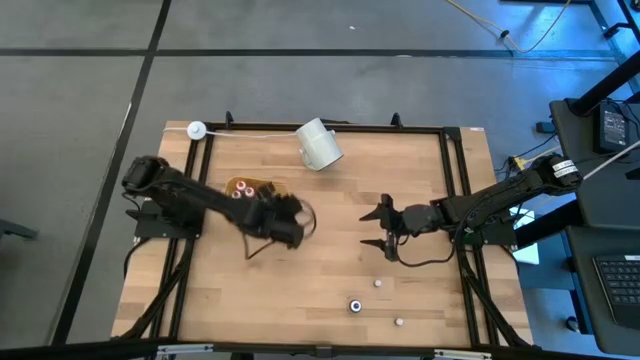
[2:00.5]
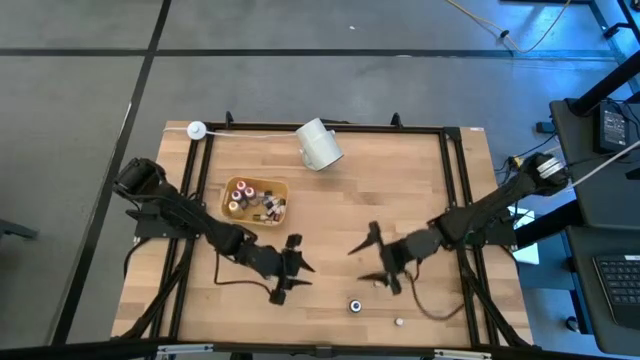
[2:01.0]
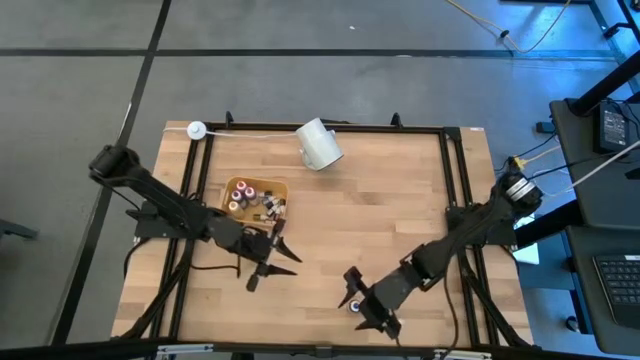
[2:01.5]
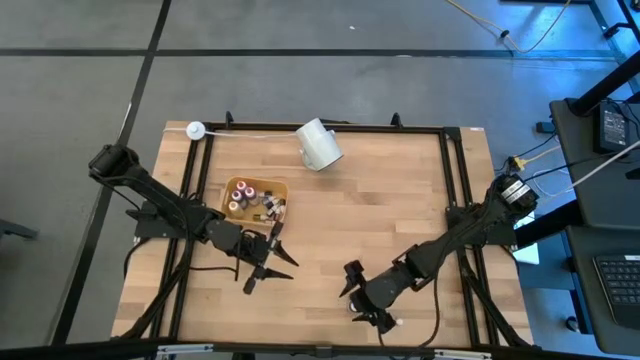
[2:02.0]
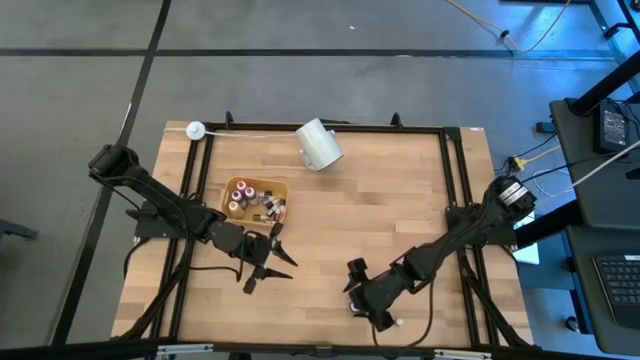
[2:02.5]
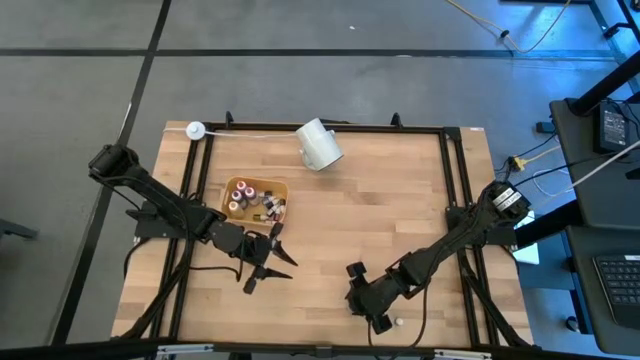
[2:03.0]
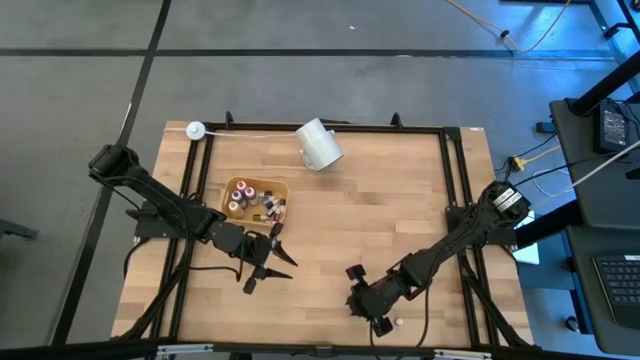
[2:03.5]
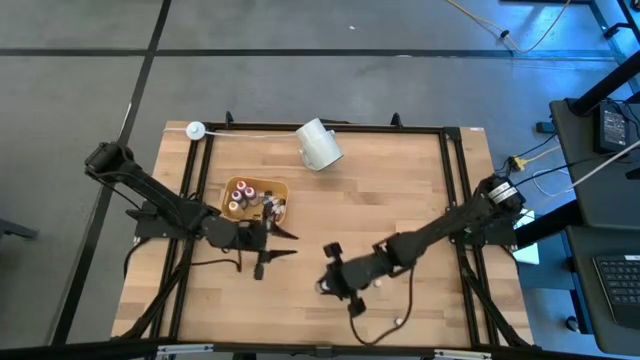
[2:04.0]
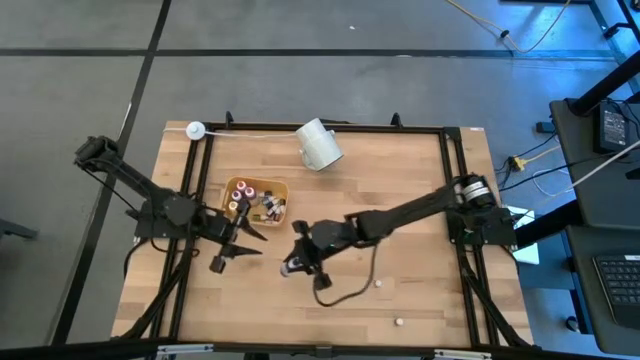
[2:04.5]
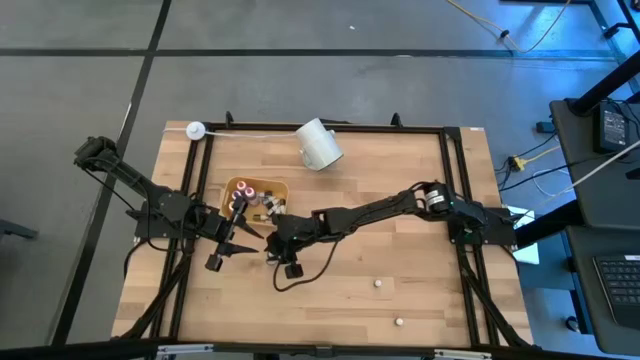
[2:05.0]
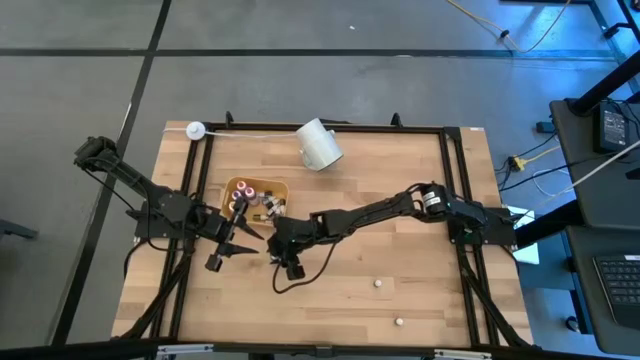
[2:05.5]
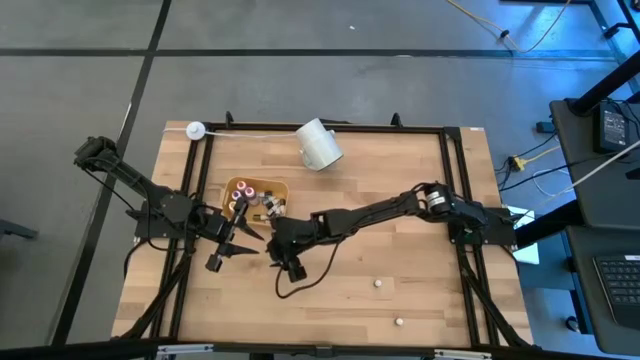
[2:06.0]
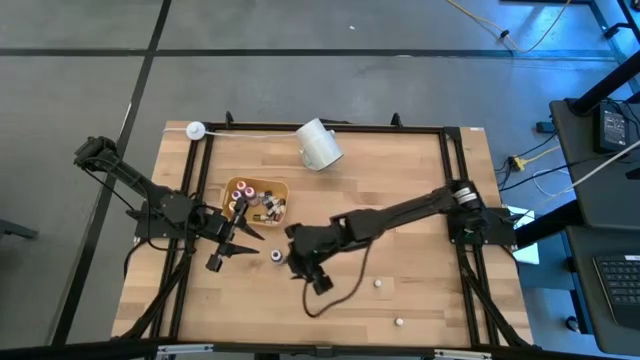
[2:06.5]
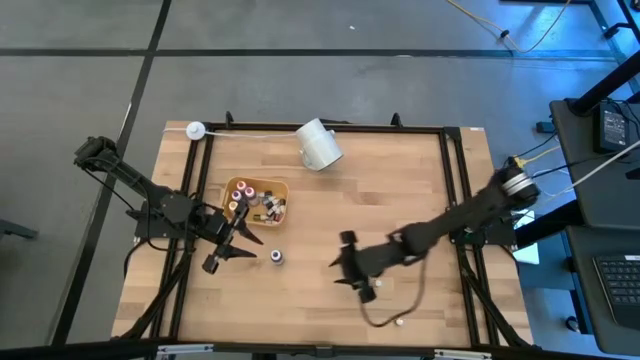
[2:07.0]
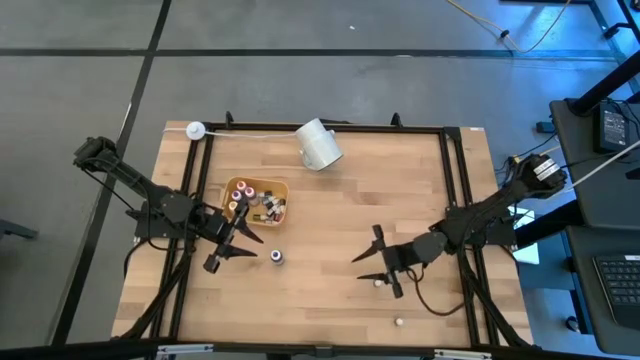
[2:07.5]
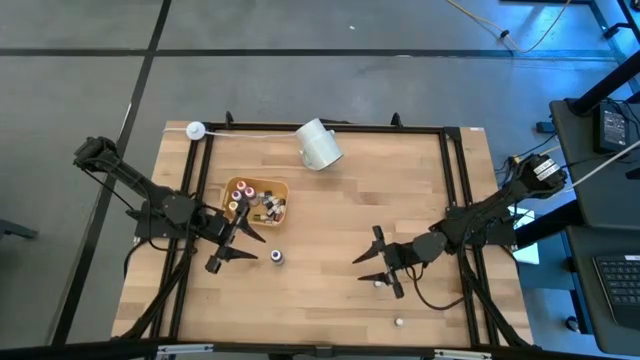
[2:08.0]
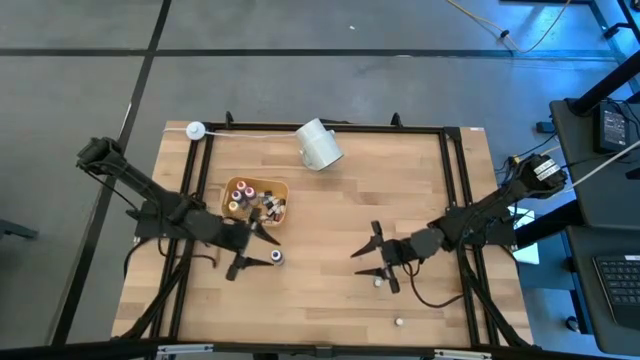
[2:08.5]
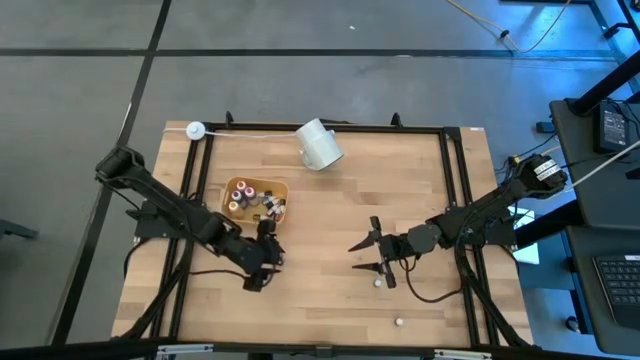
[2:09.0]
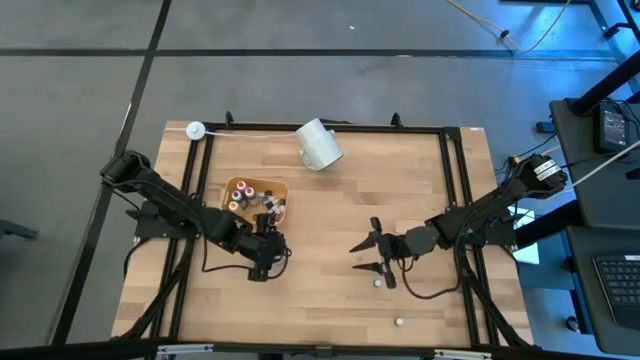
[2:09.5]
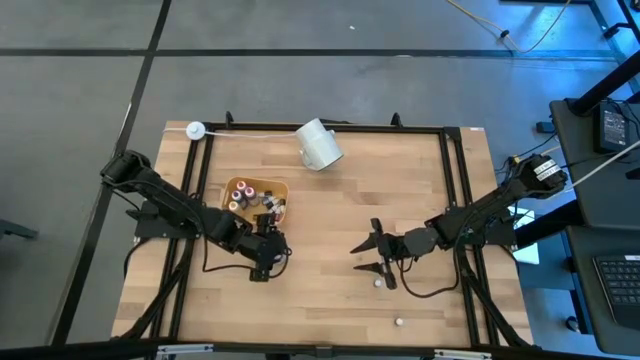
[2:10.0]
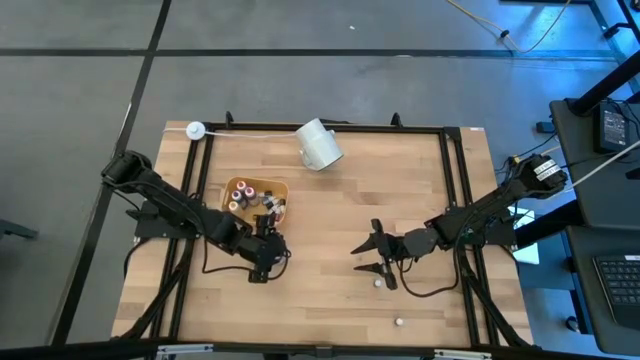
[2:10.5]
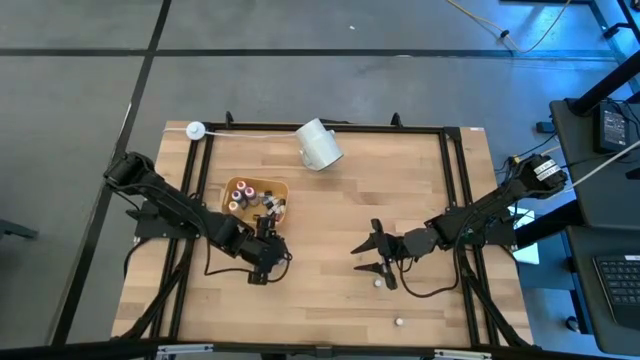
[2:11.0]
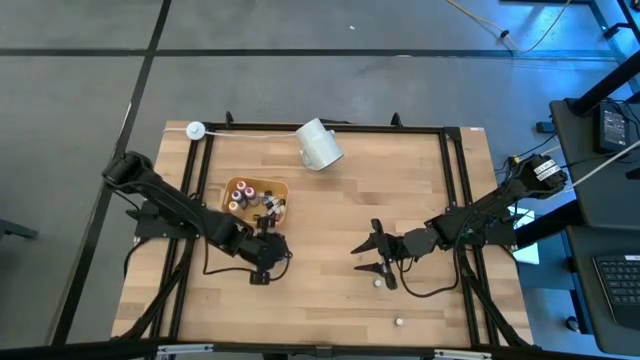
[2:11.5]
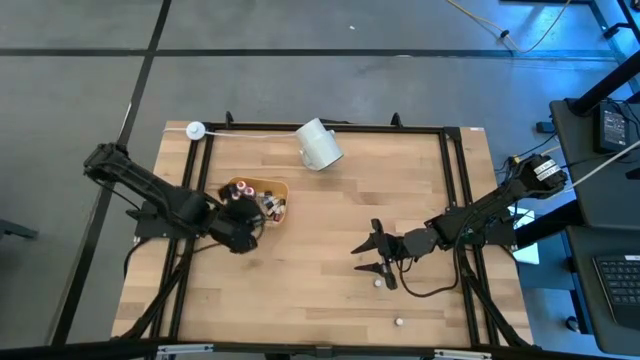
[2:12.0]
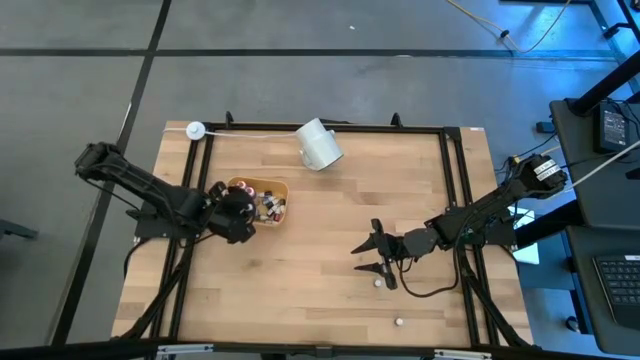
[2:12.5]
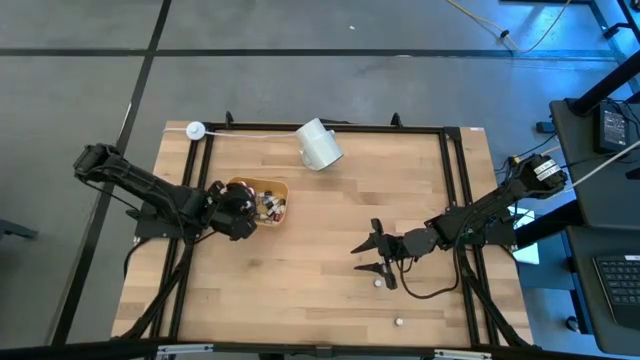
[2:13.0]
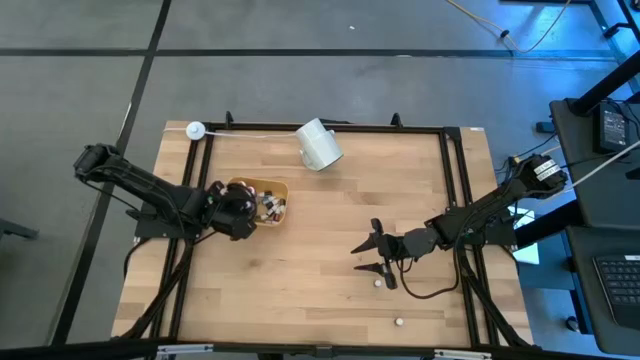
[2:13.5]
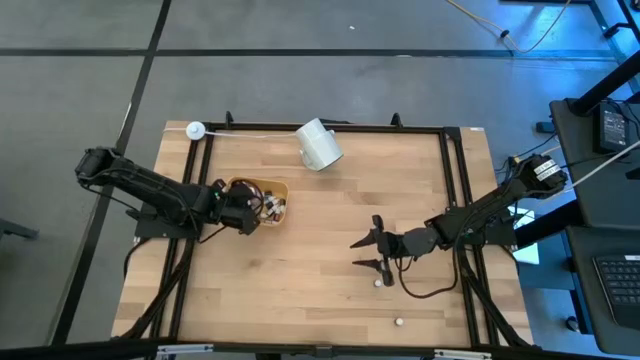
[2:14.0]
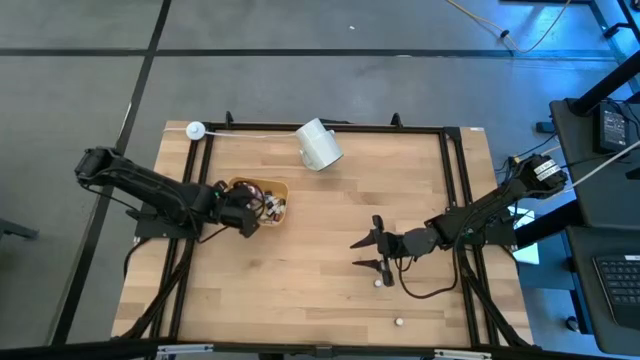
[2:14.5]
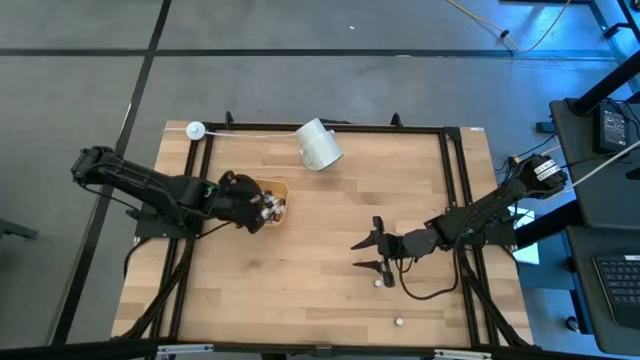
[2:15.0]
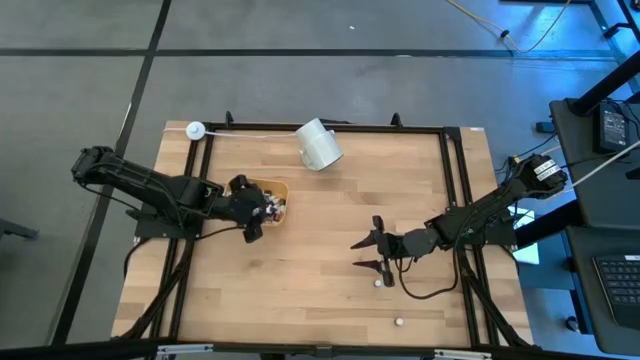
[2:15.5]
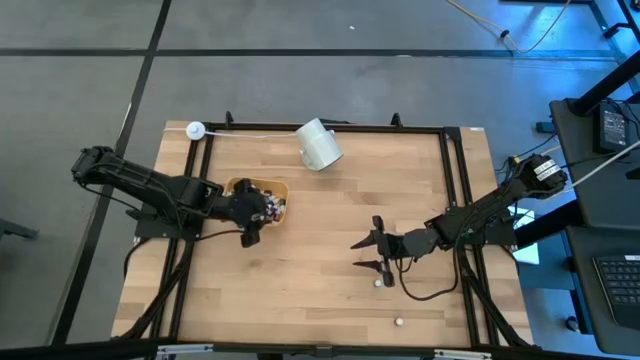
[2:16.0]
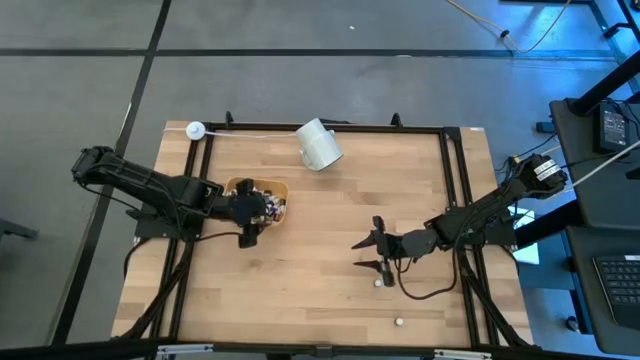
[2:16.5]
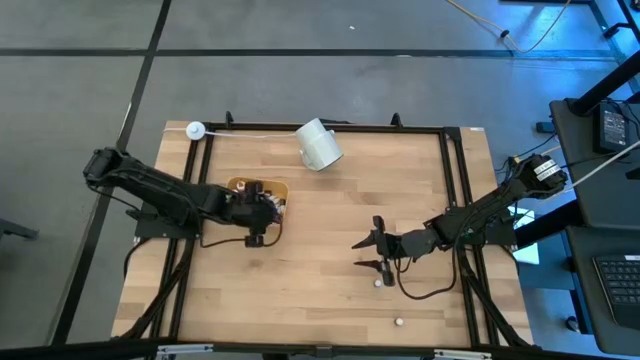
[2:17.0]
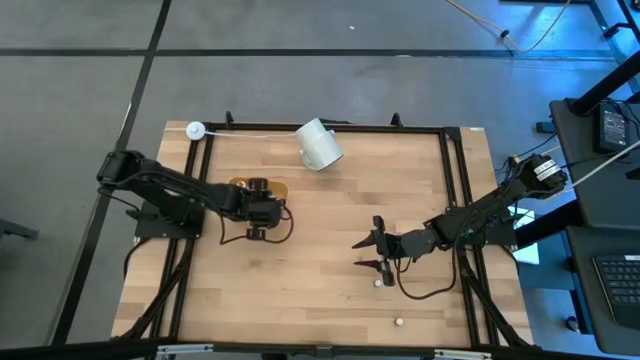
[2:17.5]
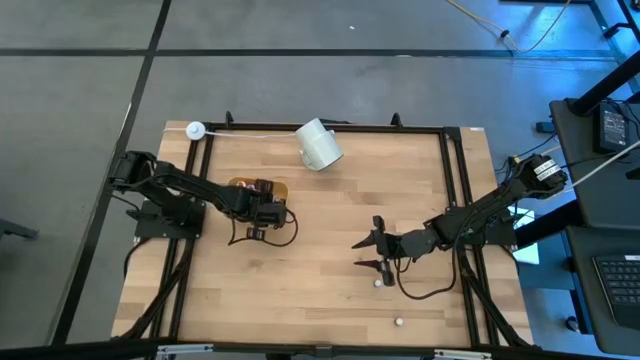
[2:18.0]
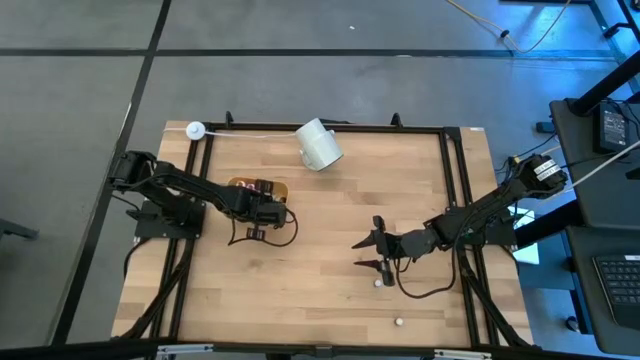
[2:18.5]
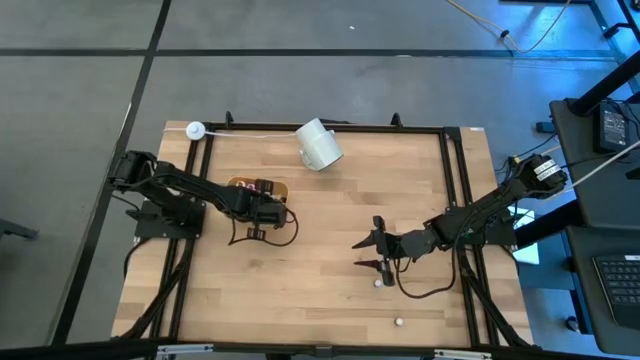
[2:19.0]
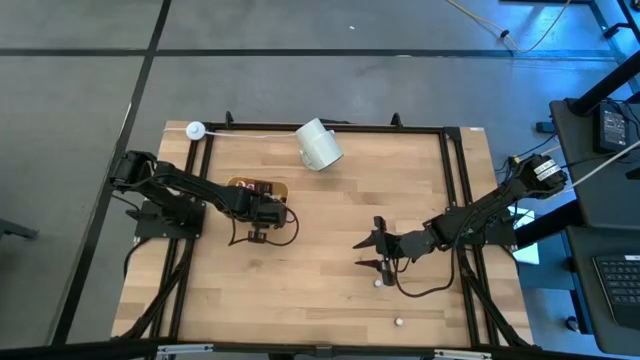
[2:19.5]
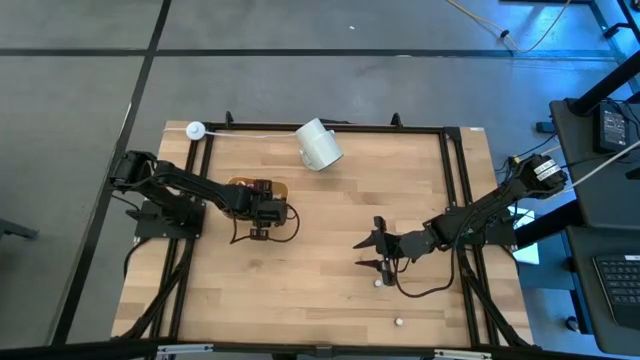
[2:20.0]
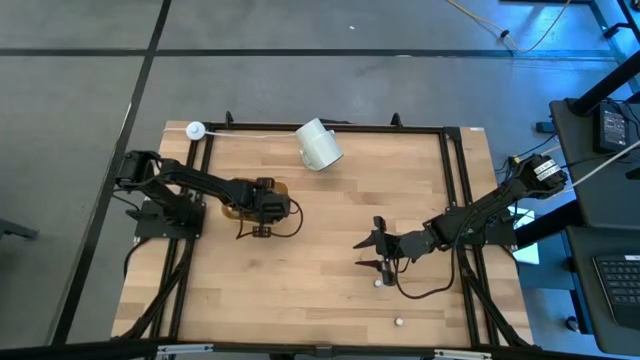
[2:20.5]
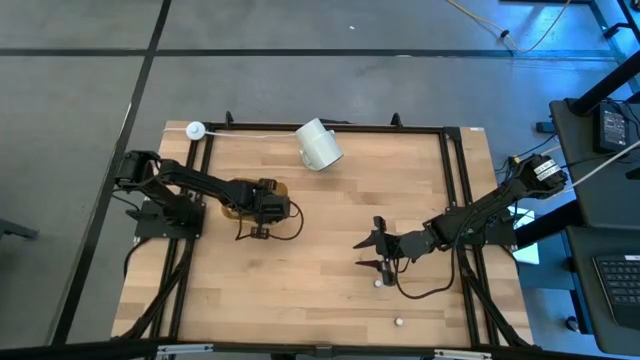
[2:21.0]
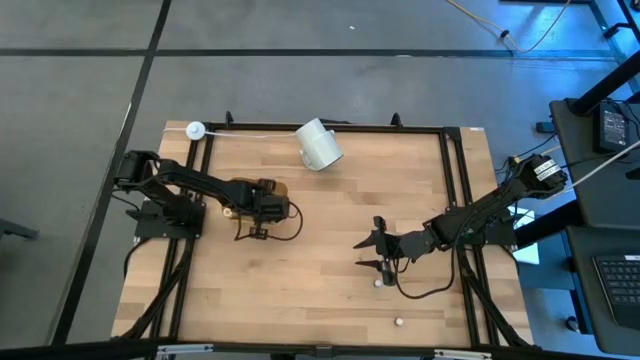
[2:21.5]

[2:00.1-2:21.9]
Task: Pick & Place food coloring
Put the large blue food coloring bottle into the bin
